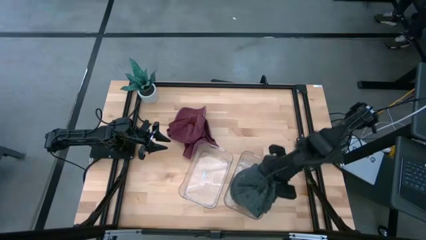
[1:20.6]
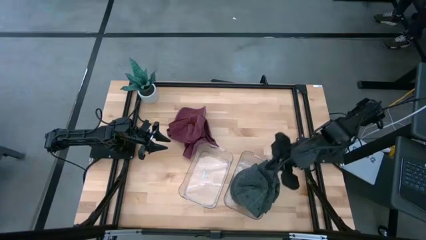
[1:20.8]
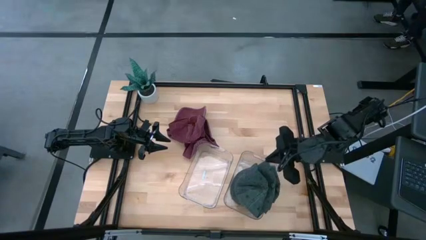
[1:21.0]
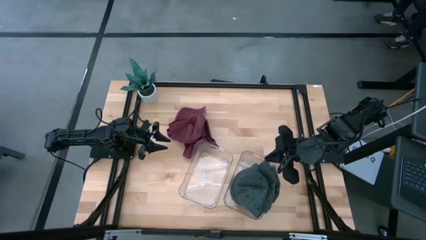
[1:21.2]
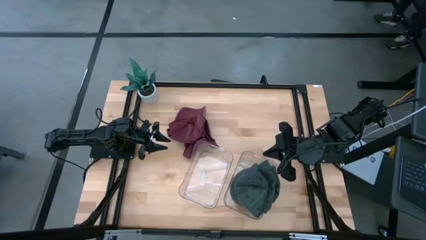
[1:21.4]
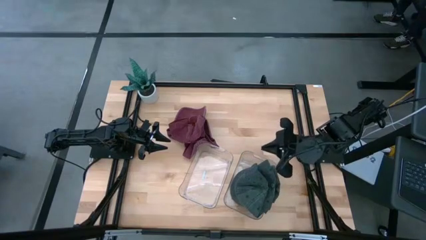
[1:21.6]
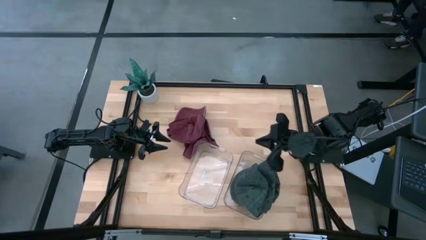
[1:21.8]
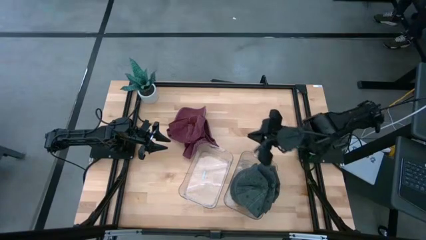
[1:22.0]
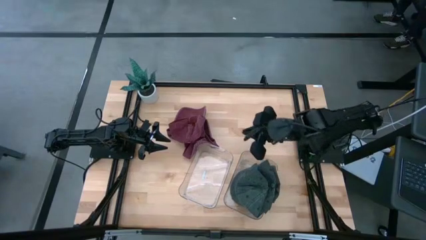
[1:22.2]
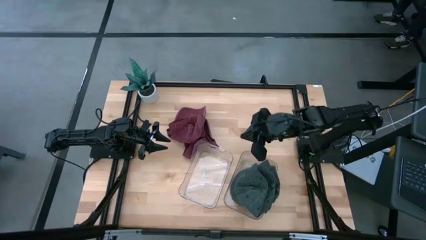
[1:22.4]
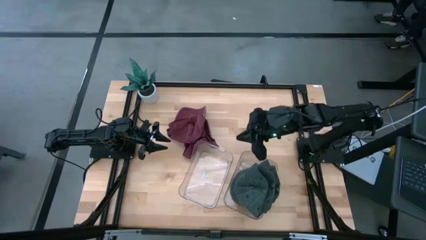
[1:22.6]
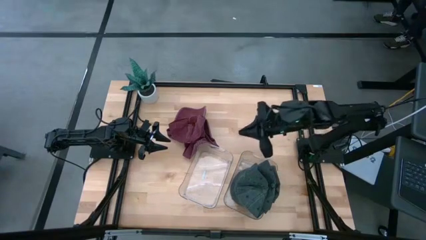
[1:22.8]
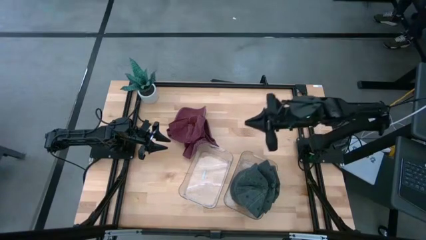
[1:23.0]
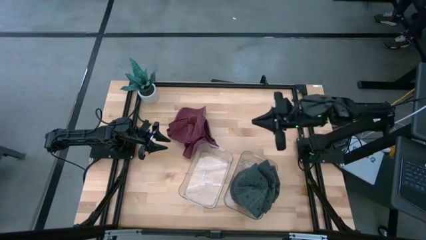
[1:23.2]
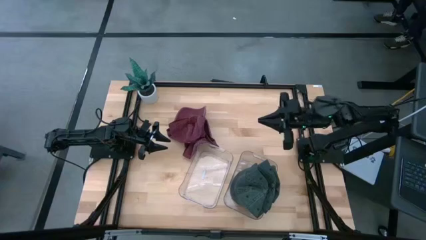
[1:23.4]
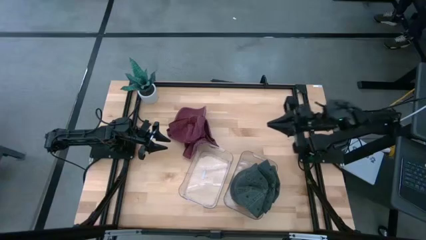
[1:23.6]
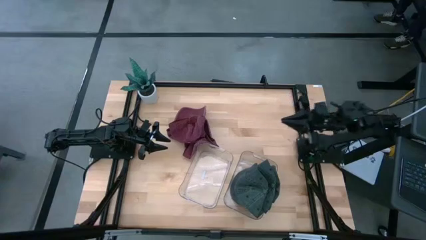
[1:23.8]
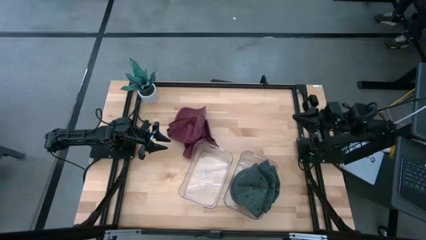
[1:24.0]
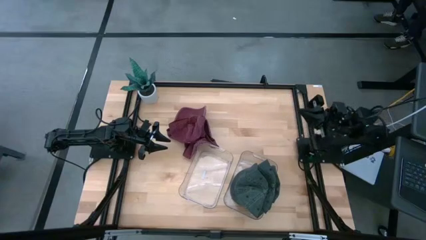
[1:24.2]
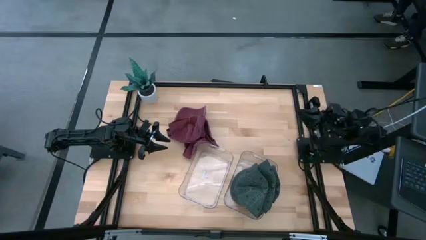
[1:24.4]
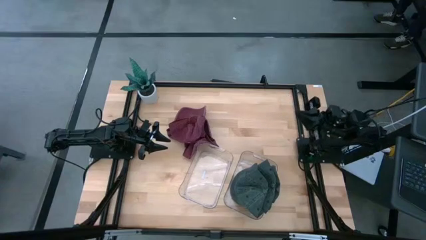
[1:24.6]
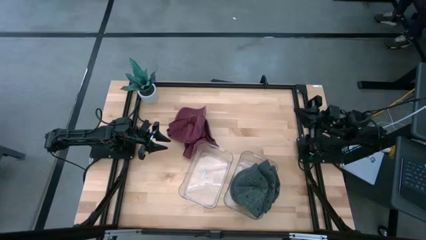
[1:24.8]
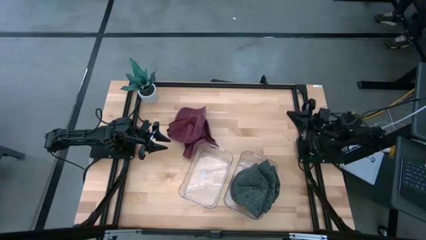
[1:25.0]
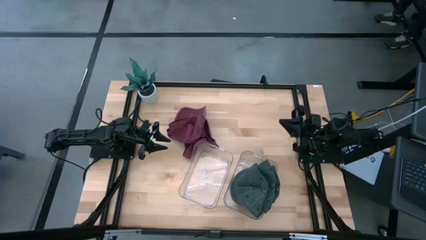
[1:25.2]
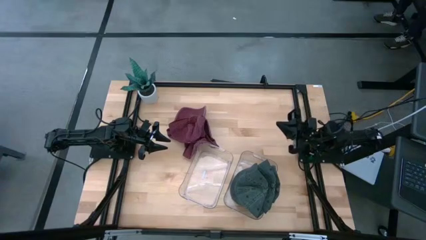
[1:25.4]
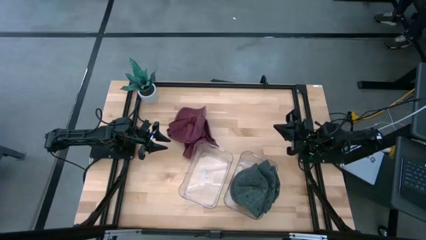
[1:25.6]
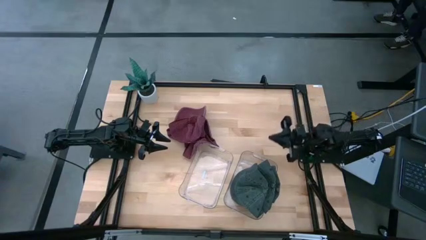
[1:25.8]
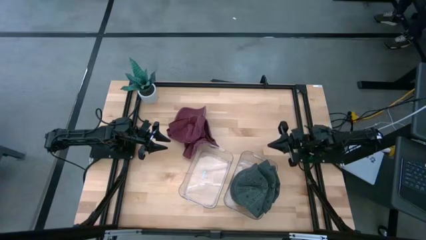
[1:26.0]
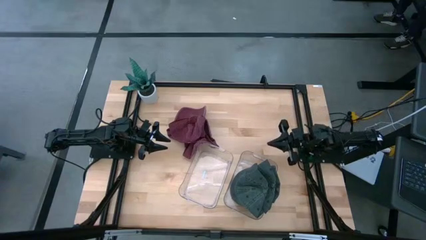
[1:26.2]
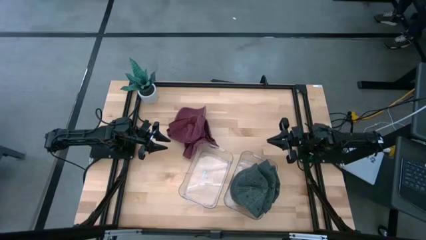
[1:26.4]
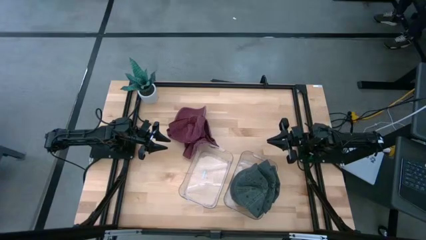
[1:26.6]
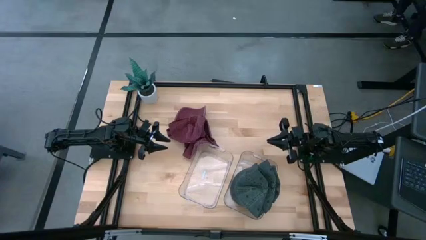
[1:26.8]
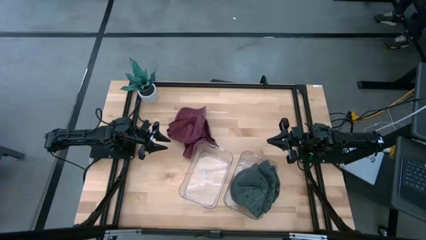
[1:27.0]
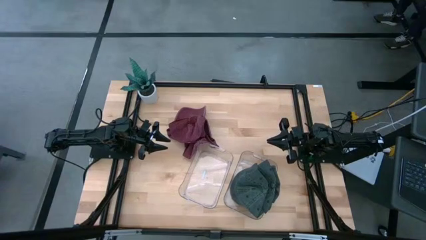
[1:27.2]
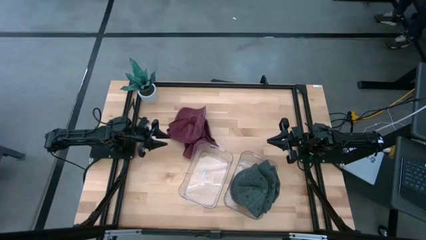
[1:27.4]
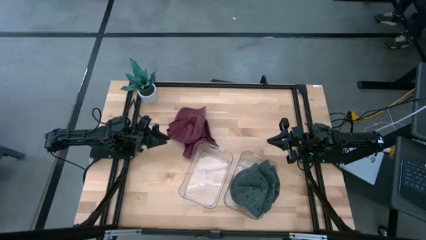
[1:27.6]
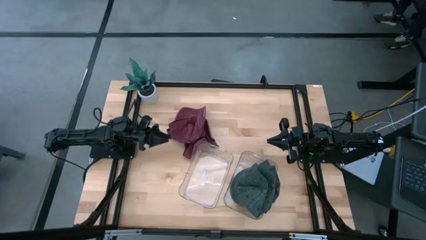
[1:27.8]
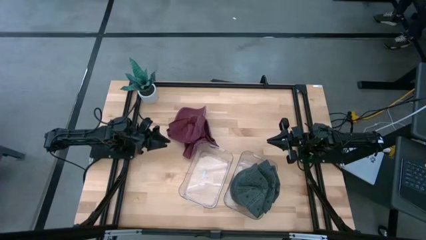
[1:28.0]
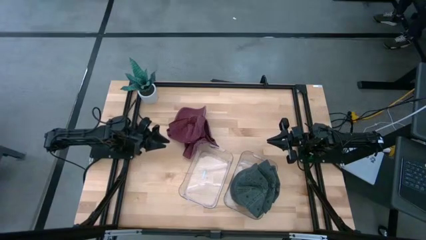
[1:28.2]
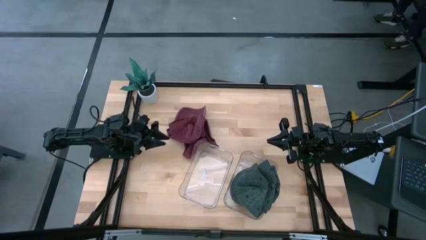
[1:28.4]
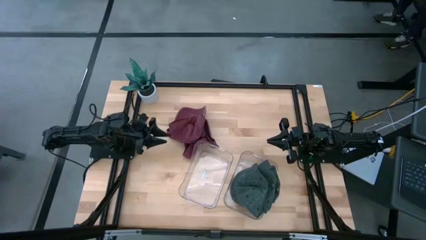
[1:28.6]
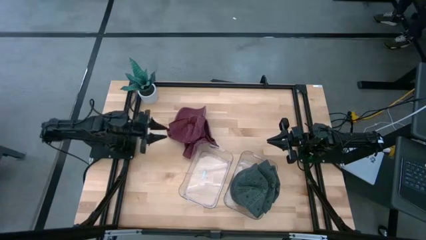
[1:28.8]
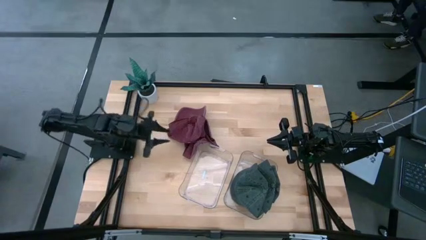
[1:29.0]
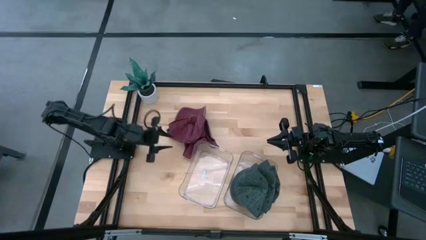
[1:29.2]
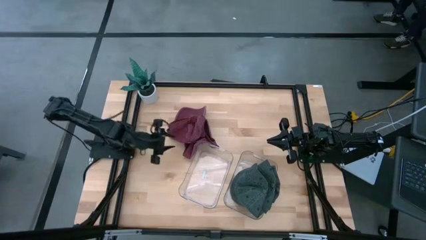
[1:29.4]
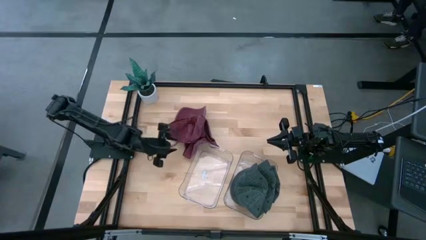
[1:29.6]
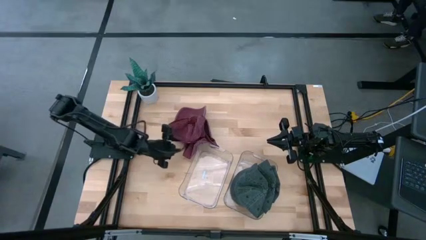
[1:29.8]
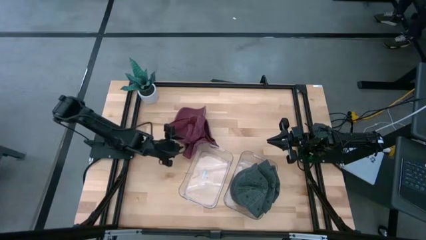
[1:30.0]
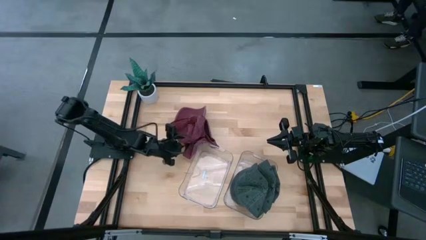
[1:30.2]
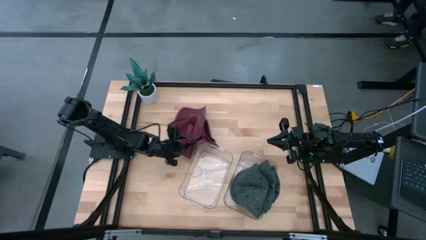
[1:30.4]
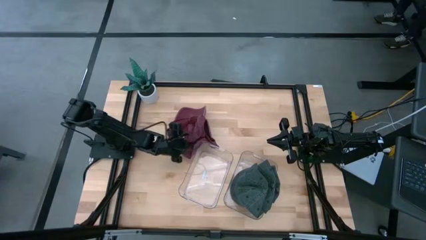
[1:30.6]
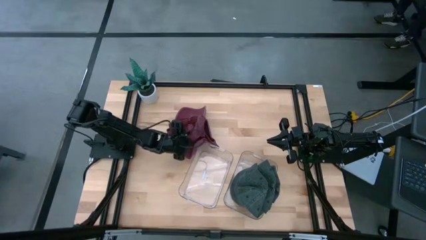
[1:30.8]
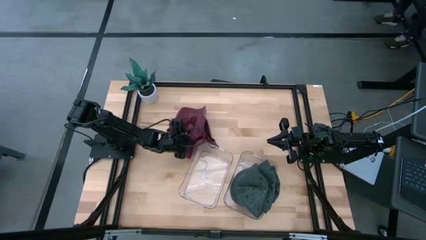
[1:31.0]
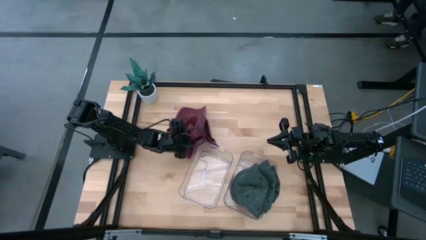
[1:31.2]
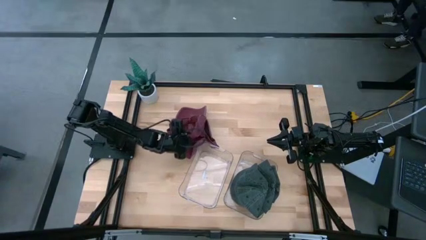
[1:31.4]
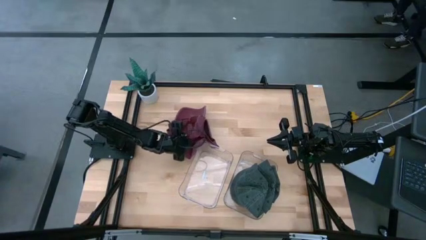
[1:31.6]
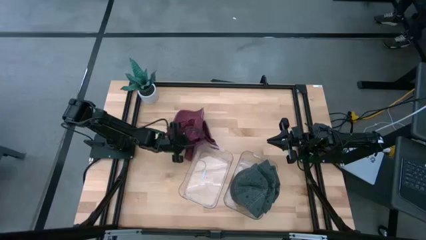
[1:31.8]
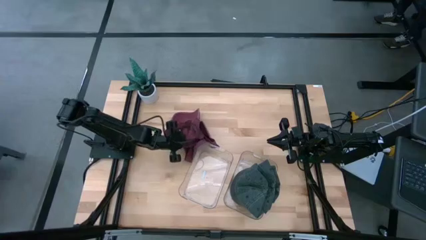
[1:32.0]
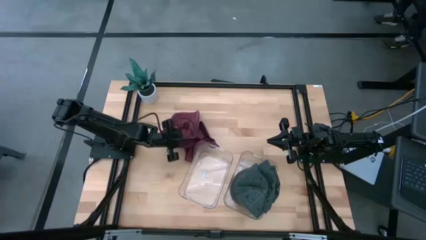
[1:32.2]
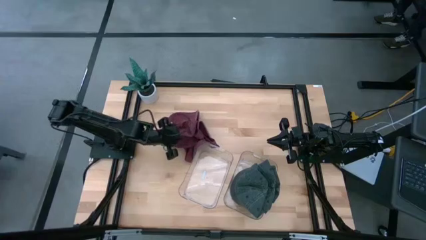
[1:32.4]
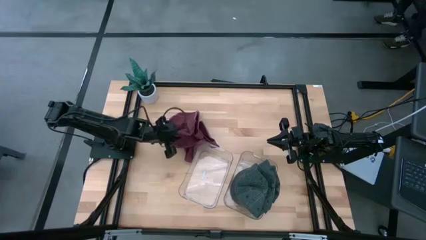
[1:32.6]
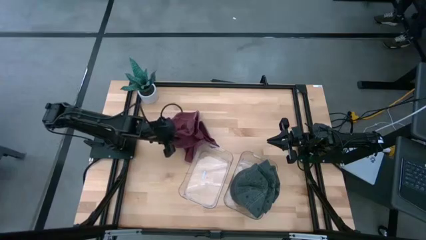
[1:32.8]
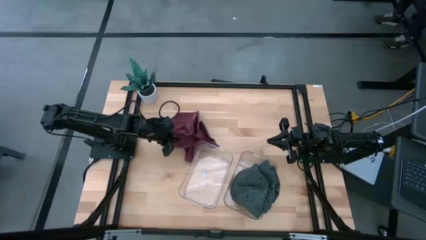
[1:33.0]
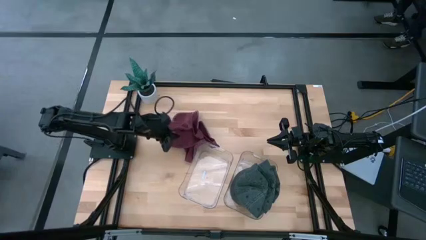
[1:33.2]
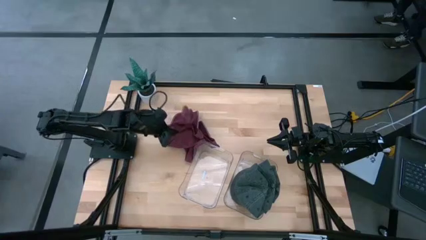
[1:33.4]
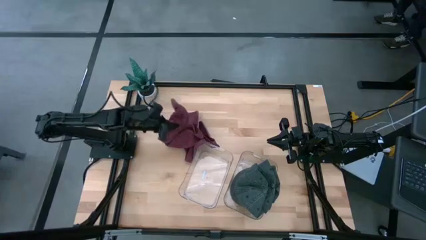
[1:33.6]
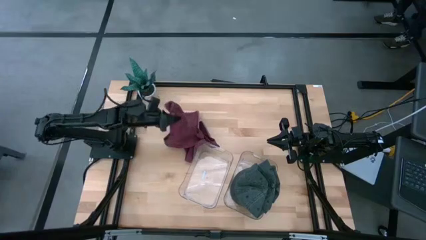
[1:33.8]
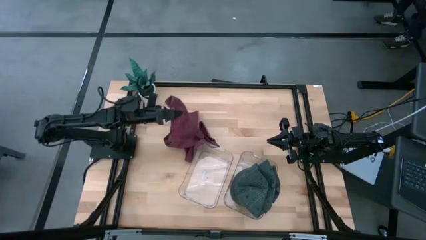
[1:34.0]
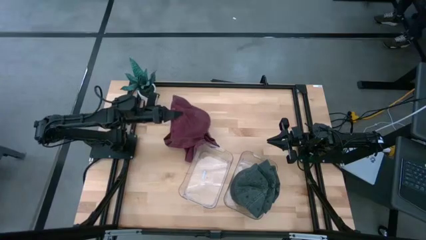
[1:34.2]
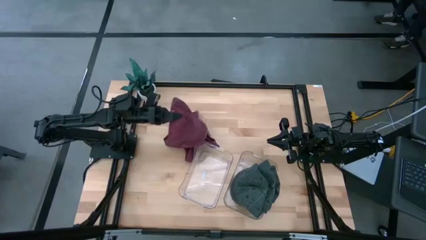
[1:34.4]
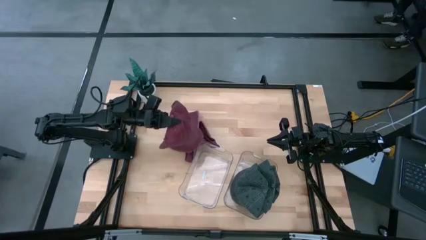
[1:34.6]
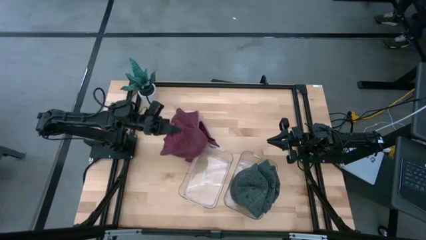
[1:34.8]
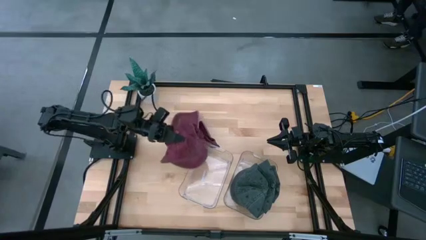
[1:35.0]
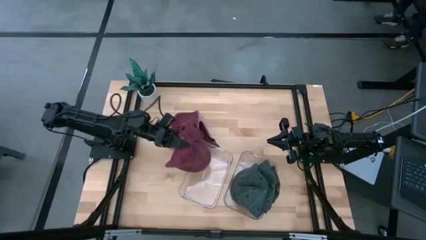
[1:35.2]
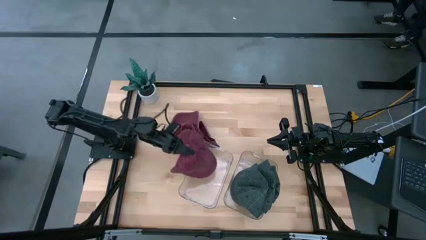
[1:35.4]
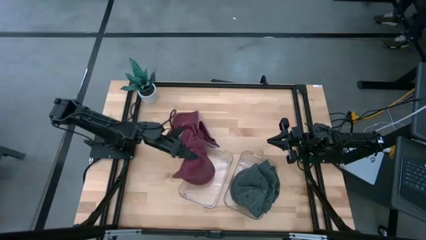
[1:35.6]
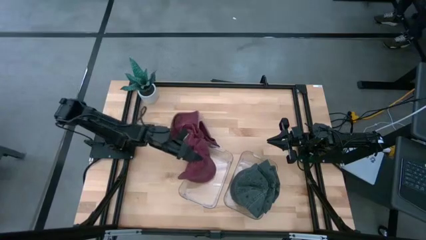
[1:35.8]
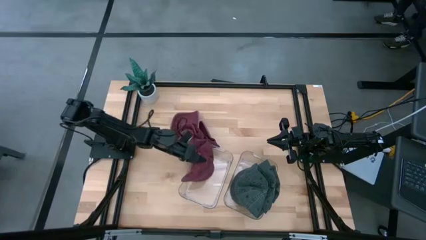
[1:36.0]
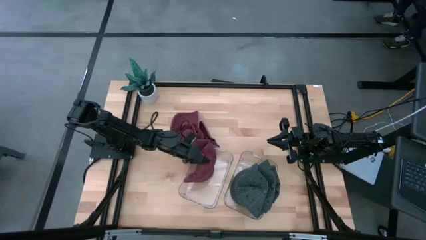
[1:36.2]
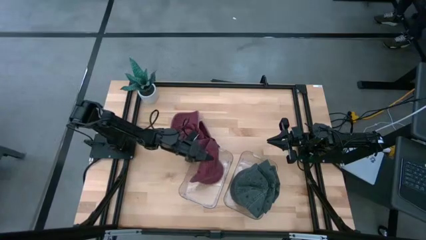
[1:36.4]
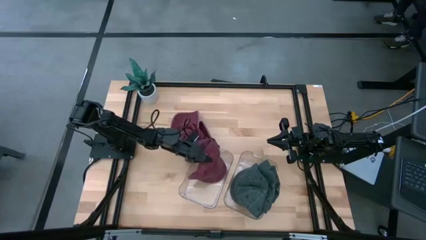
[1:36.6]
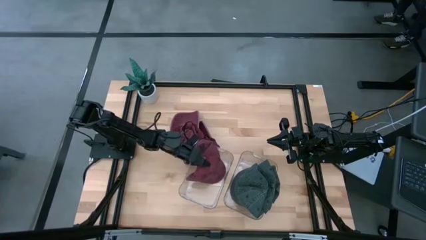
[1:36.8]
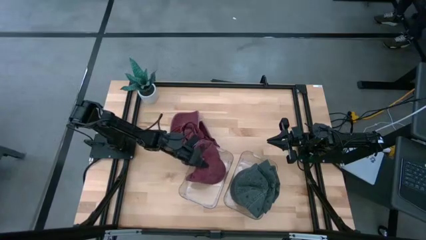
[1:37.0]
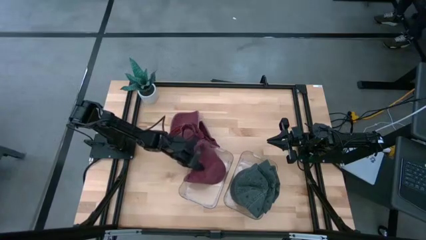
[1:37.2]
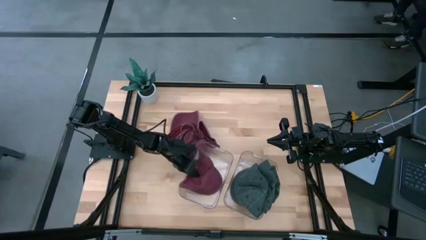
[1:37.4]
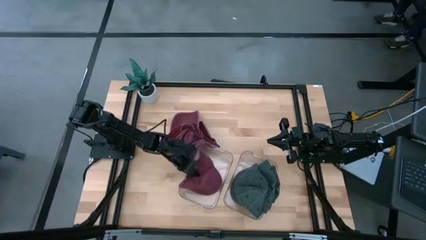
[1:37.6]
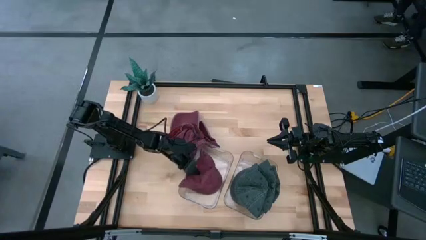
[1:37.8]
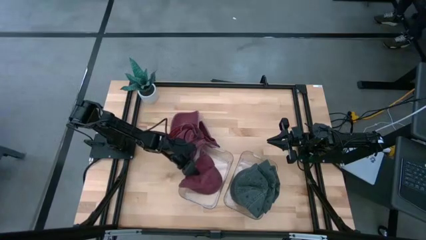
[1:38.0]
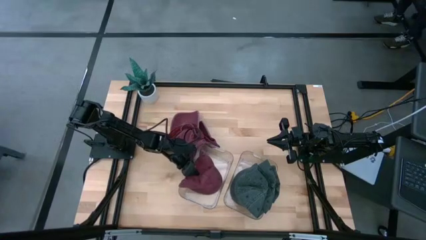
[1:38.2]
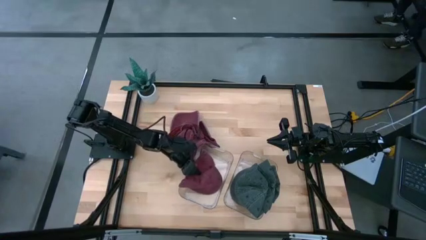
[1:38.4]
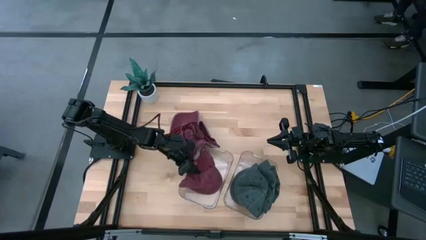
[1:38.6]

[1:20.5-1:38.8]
Task: Pick & Place hat
Put the top red cap into the left transparent bin
